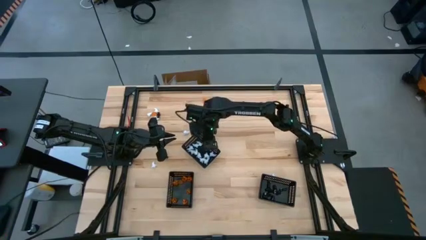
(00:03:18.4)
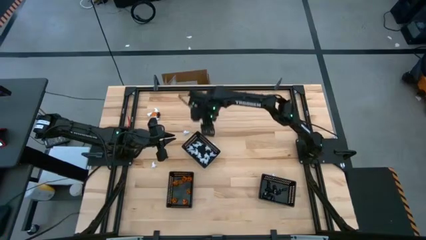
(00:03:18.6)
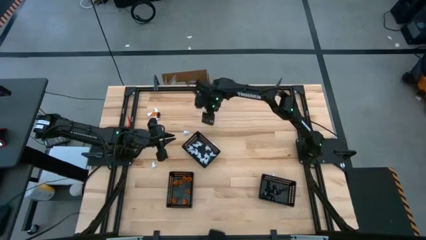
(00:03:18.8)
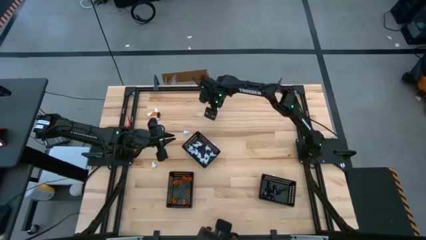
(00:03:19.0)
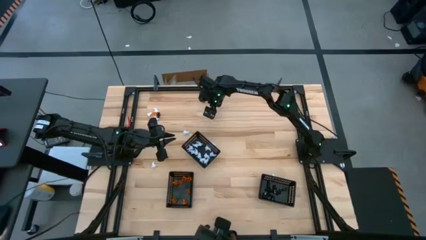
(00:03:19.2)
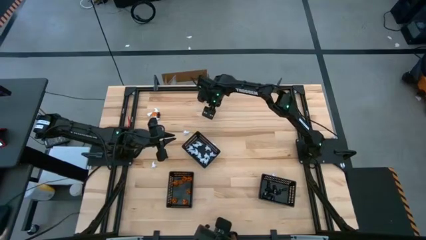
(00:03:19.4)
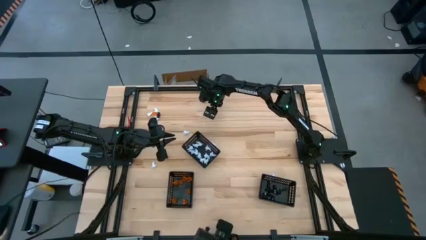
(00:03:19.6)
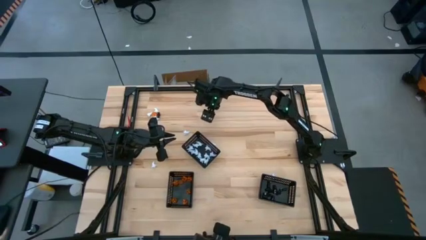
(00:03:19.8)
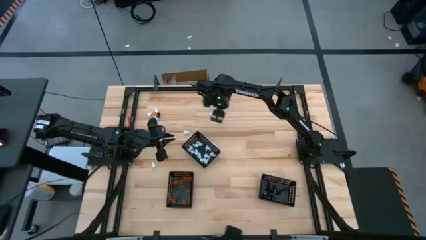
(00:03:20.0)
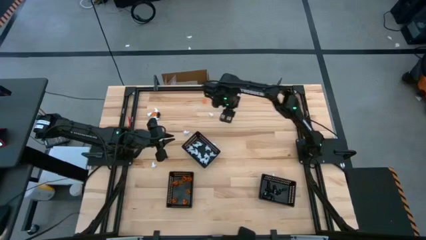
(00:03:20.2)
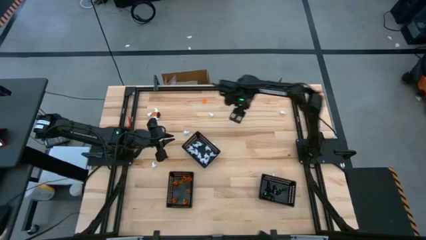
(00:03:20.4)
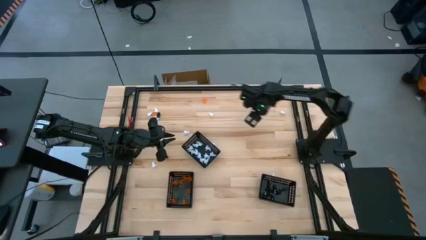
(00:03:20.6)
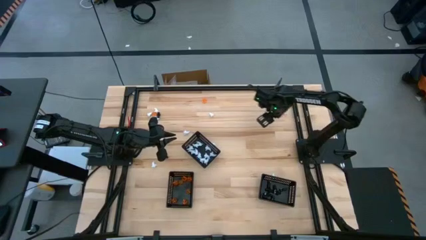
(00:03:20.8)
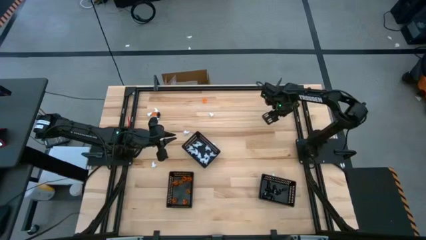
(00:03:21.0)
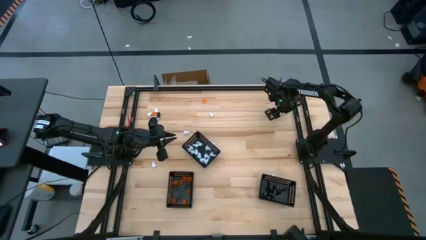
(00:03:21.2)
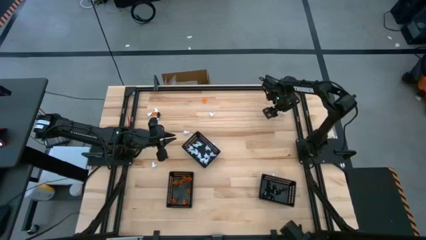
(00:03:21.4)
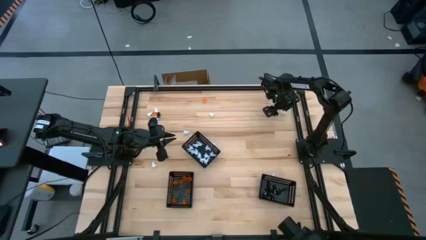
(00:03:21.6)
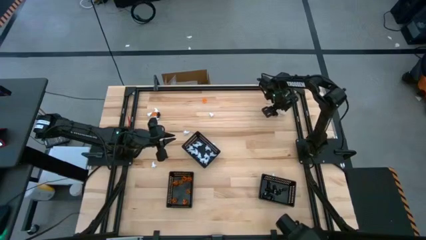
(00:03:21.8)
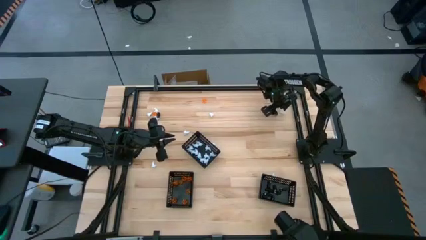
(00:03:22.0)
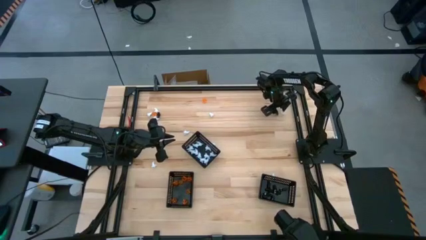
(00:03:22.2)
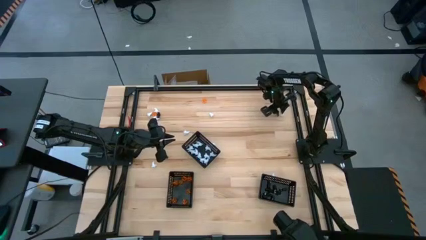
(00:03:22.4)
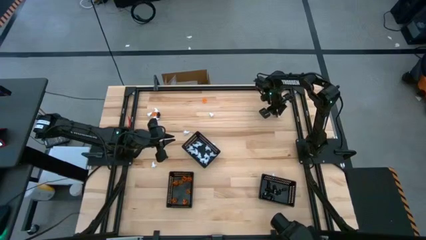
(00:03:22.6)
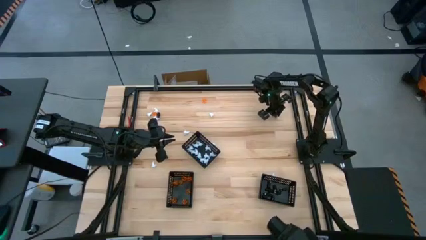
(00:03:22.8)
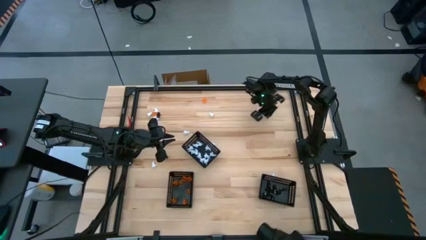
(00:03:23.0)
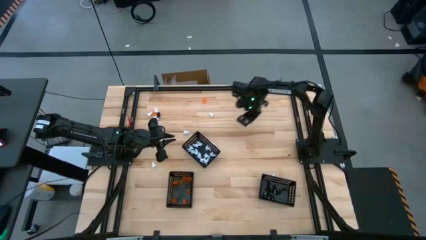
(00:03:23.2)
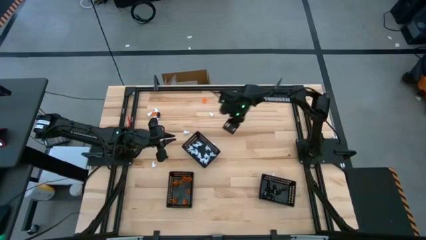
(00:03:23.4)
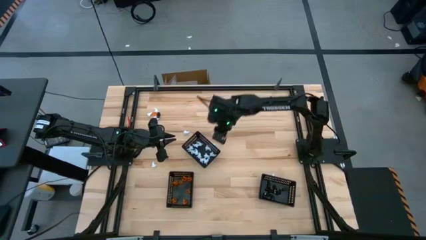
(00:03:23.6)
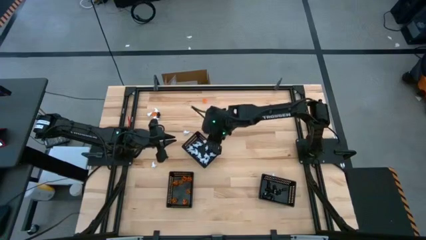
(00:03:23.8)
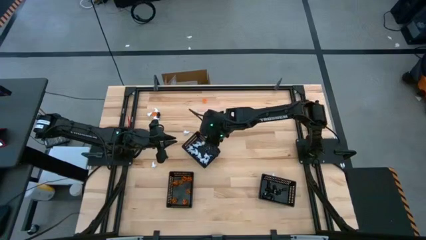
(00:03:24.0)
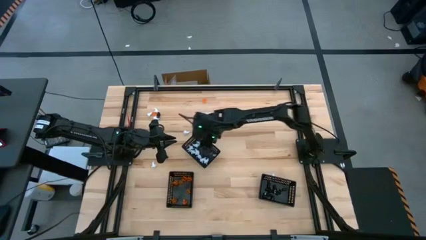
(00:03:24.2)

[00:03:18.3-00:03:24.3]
Task: Sort Halloween decoration
Put the white ghost toy into the middle black basket

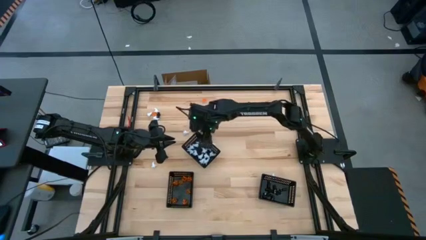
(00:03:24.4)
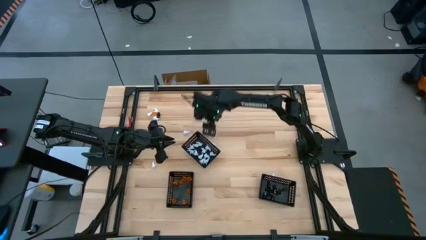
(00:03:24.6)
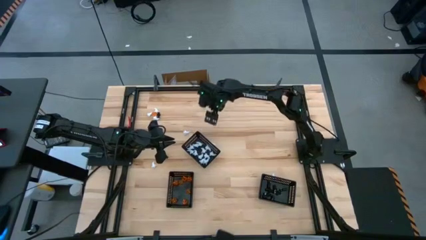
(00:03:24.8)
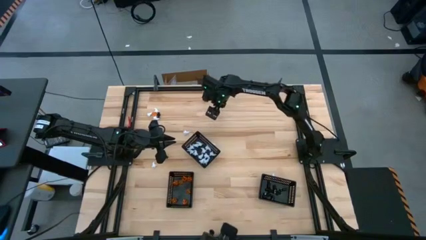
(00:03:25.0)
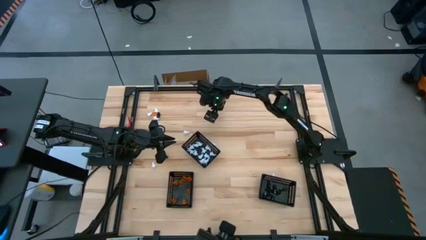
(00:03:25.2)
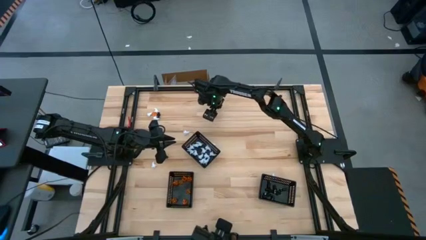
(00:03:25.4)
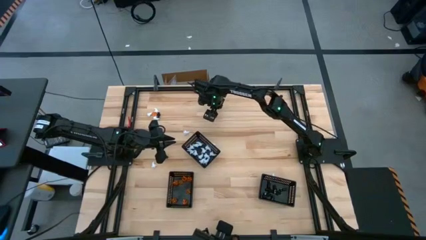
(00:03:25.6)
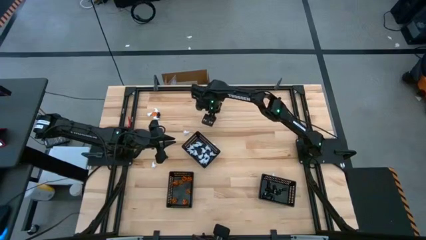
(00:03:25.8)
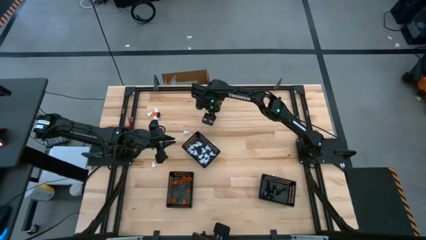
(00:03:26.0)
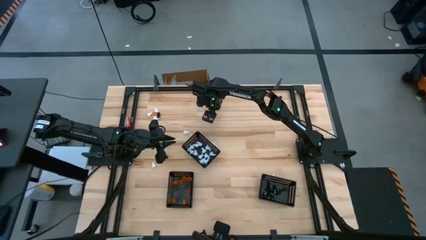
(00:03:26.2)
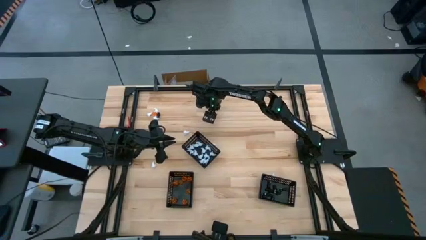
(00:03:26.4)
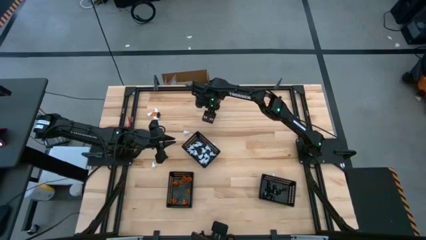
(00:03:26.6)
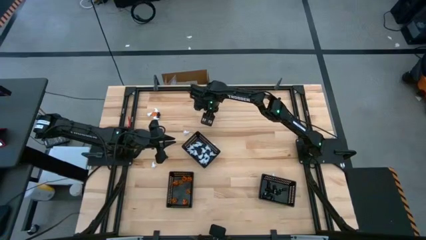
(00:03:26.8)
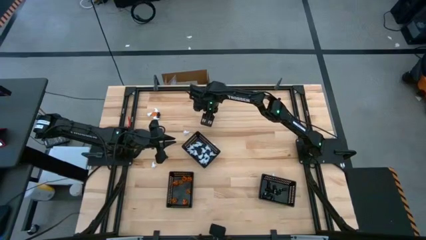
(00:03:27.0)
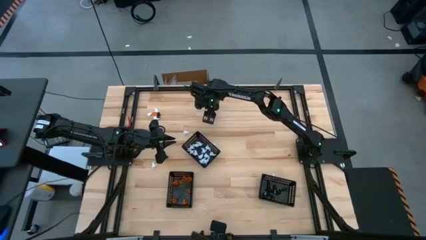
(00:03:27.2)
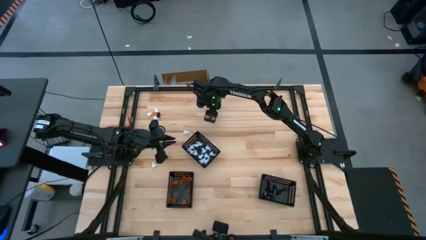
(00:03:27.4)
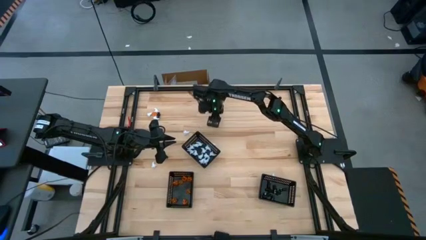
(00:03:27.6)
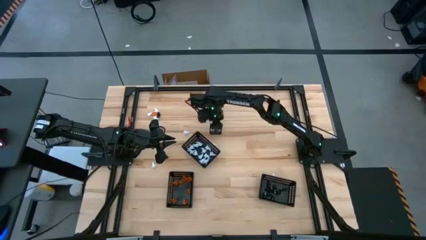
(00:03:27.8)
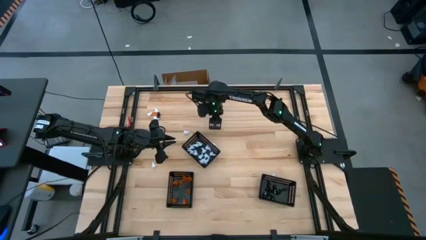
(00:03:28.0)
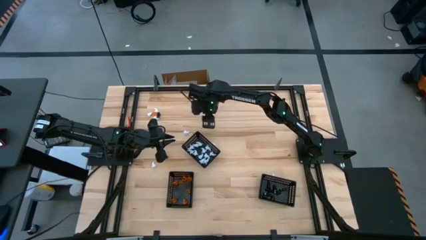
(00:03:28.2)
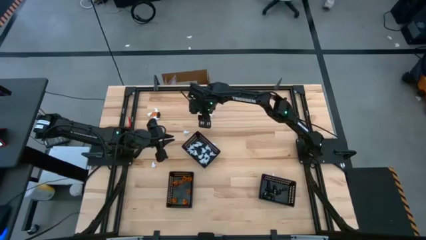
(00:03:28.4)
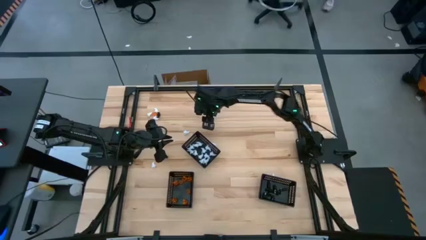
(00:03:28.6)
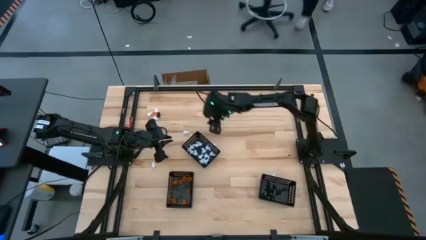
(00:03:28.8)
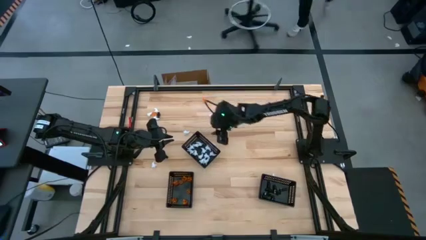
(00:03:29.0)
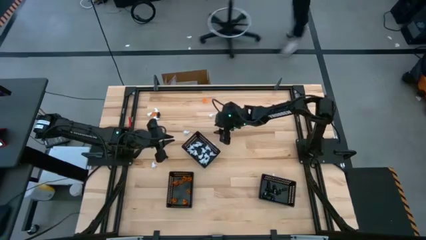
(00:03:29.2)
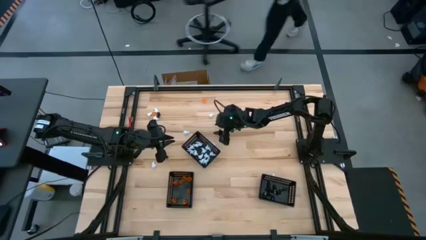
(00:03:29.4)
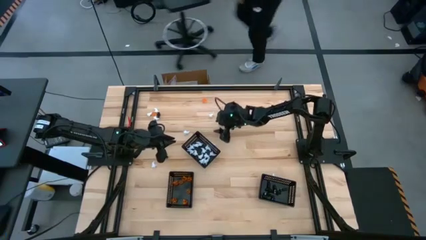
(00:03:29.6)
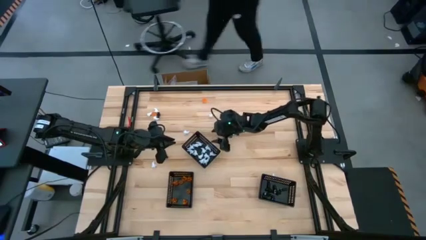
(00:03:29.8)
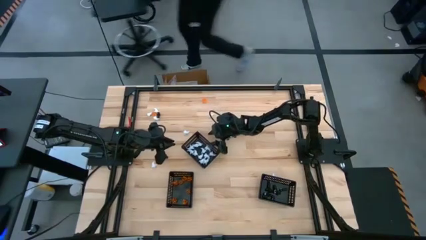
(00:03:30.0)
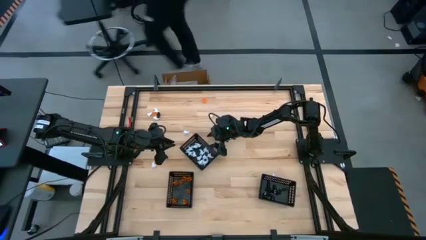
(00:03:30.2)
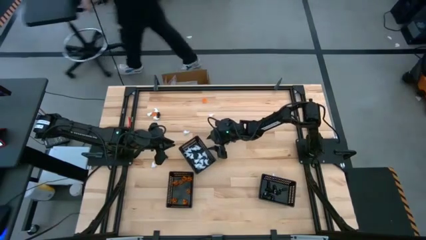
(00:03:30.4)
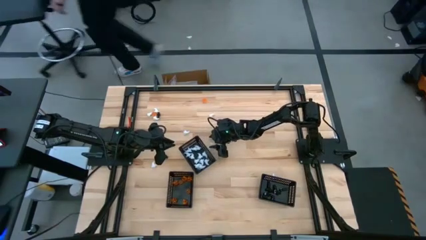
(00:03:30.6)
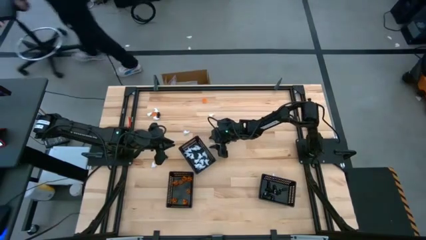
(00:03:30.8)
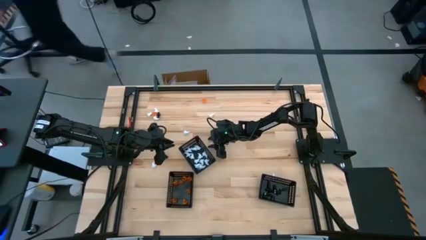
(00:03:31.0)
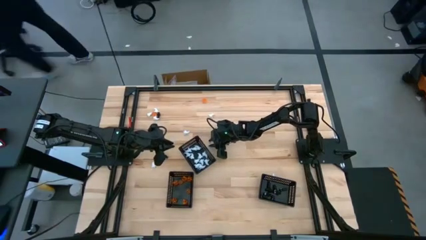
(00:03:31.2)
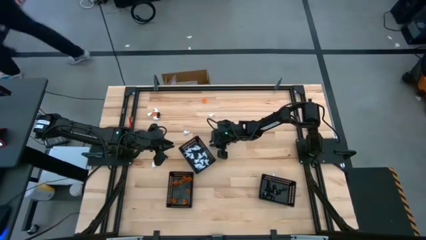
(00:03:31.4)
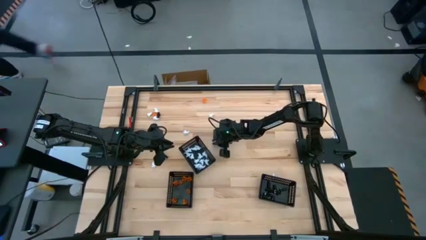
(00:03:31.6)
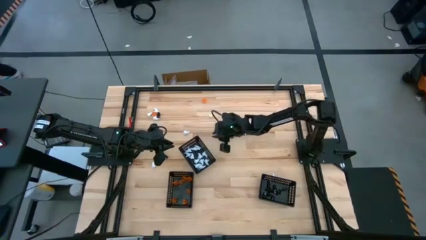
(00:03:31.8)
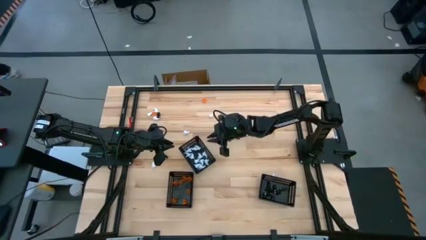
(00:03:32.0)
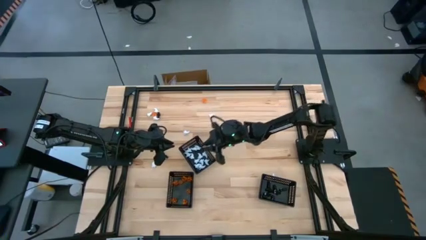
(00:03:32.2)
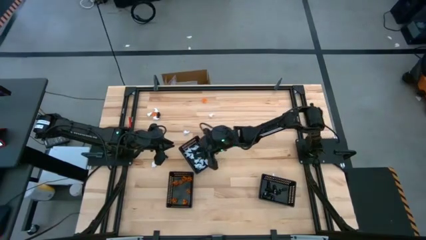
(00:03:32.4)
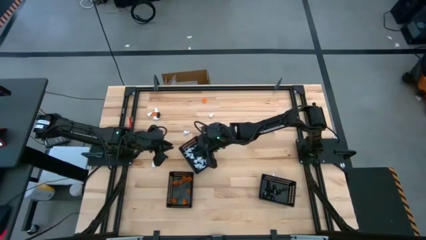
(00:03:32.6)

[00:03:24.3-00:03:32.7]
Put the white skeleton toy into the middle black basket

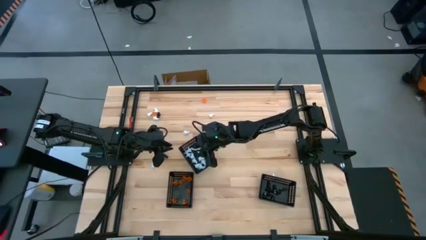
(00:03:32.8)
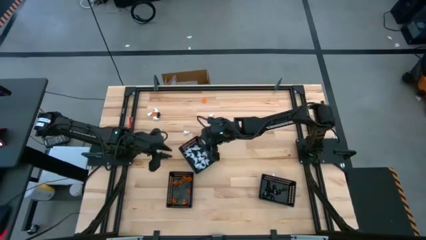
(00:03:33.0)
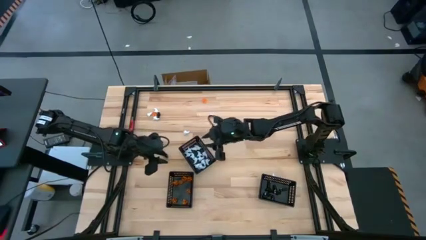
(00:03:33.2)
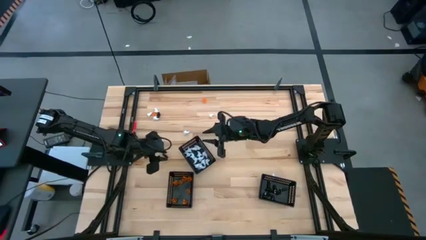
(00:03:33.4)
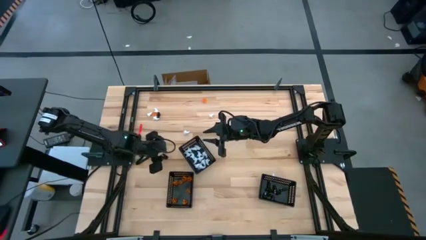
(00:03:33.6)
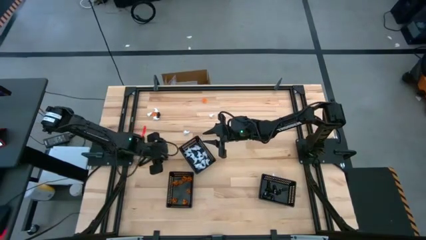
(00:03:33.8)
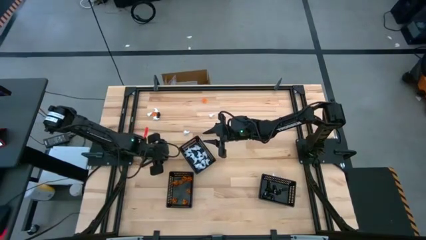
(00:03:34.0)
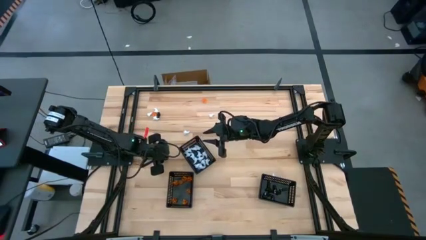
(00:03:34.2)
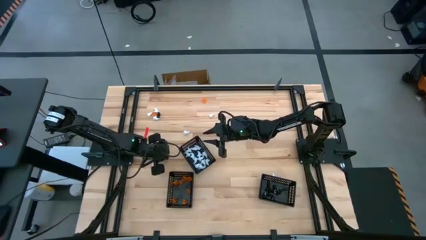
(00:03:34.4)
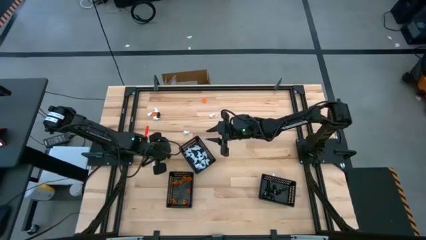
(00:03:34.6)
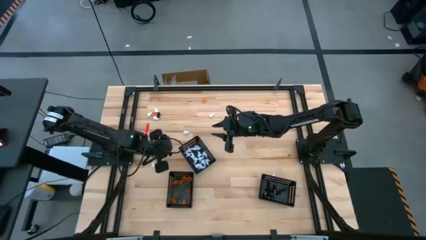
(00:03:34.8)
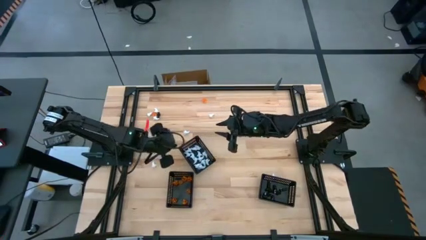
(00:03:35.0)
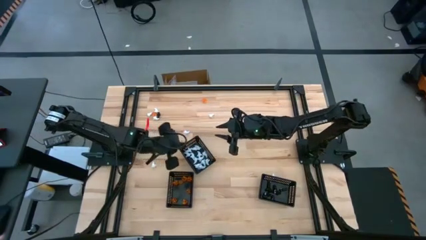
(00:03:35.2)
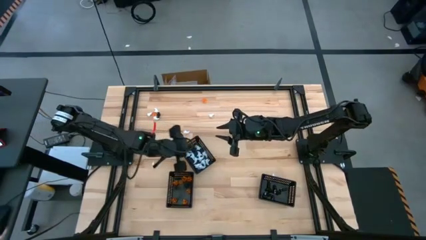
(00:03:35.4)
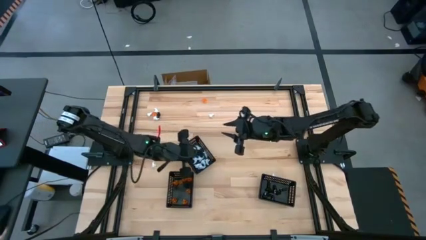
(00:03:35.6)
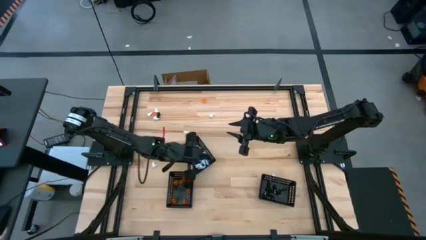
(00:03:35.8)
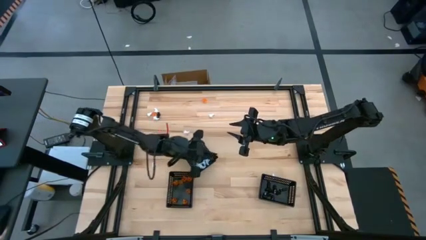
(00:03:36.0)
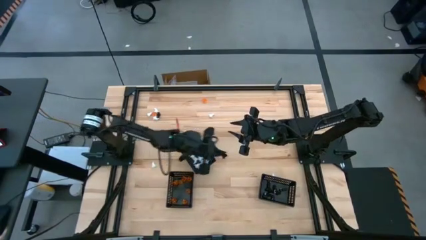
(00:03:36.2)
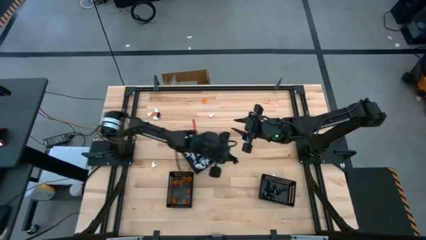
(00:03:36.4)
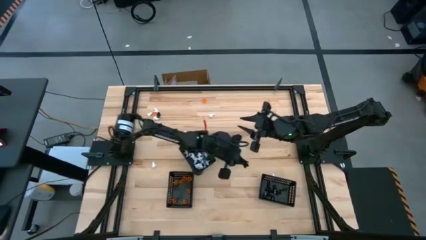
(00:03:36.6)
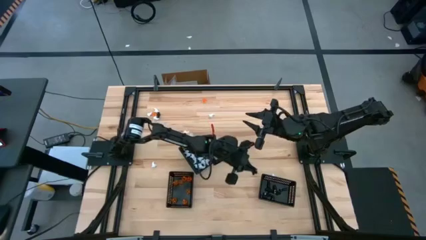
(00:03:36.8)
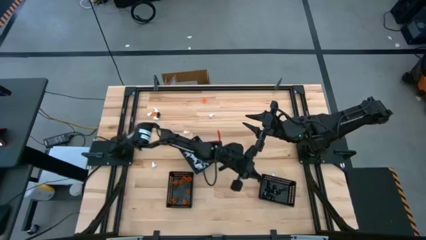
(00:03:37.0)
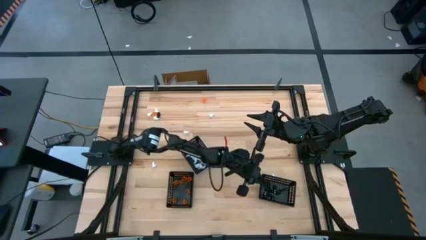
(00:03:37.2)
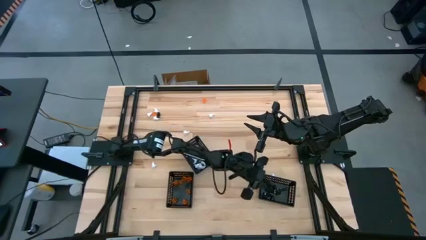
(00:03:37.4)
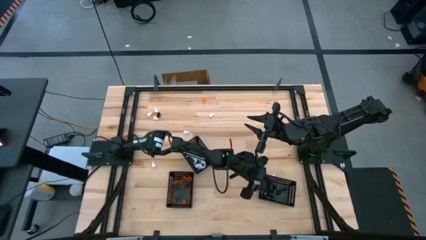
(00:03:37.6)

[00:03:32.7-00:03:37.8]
Put the black skeleton toy into the right black basket
